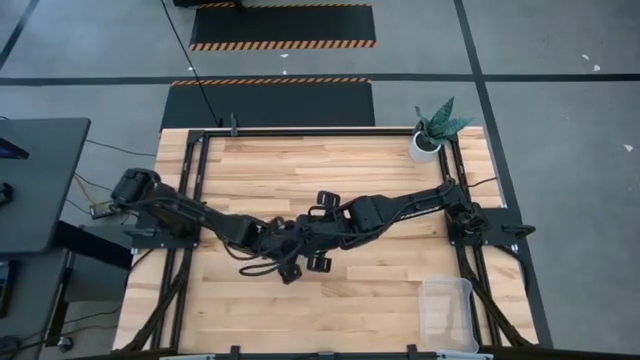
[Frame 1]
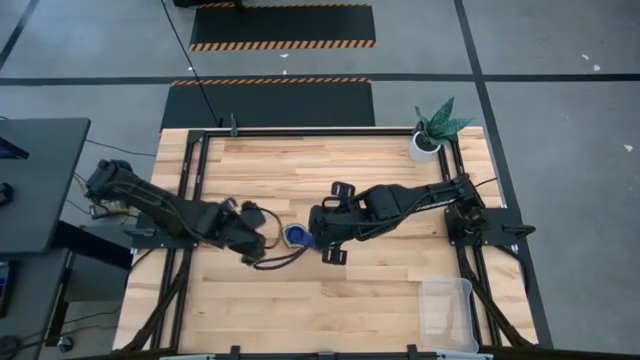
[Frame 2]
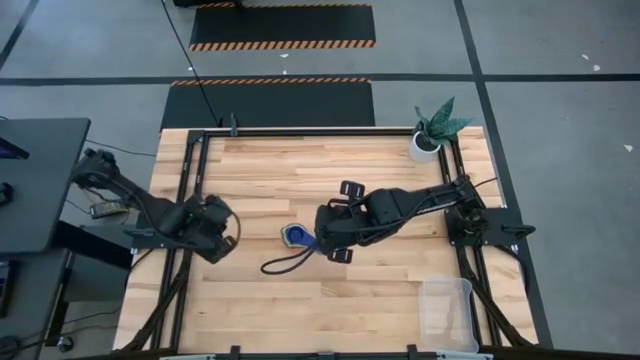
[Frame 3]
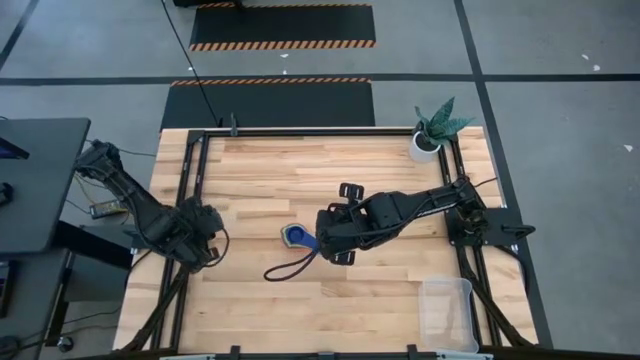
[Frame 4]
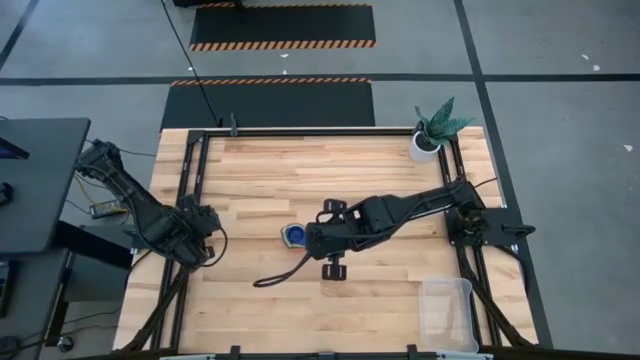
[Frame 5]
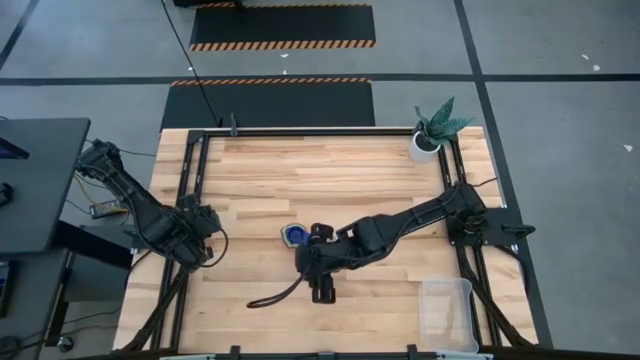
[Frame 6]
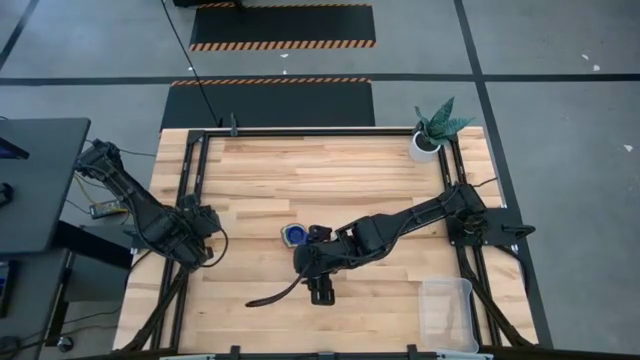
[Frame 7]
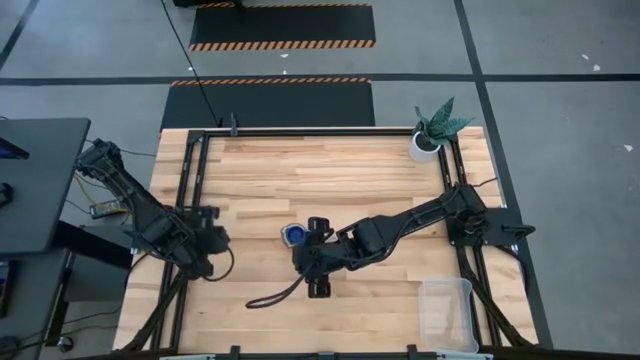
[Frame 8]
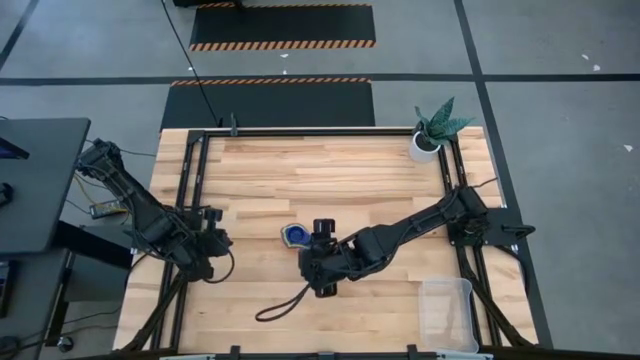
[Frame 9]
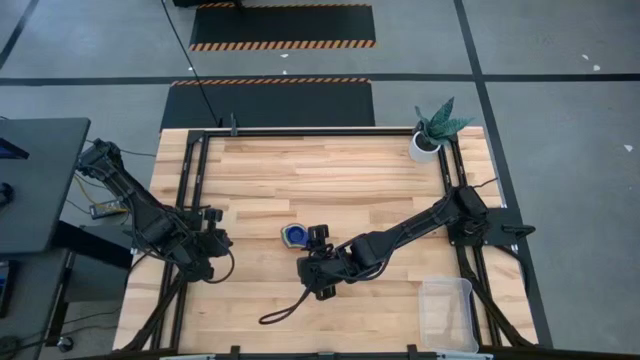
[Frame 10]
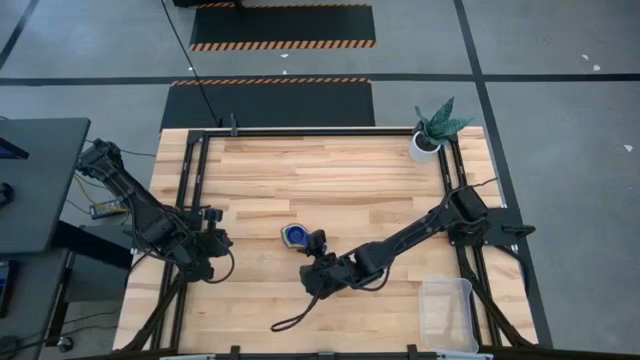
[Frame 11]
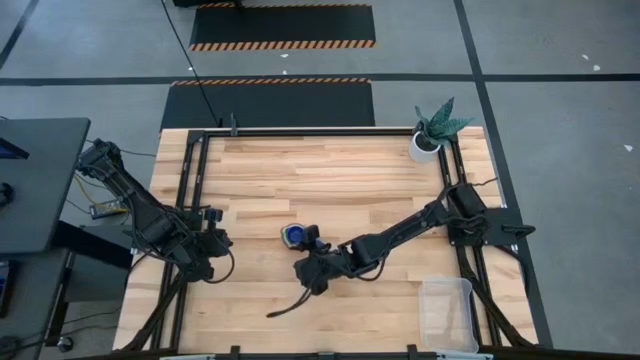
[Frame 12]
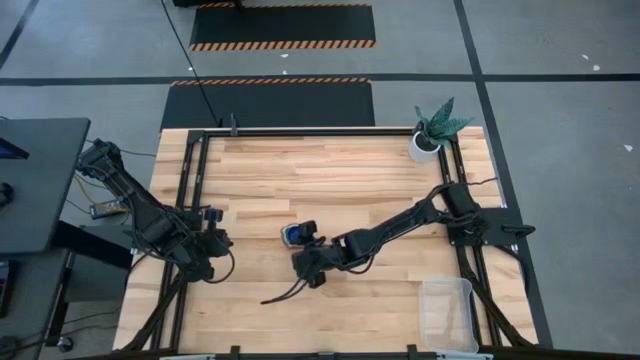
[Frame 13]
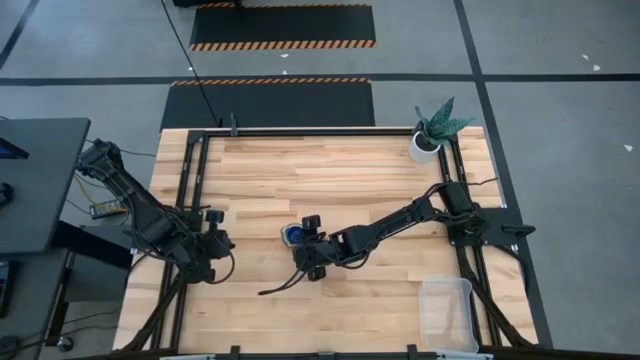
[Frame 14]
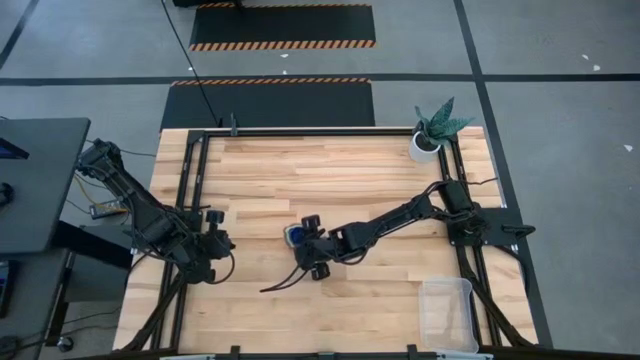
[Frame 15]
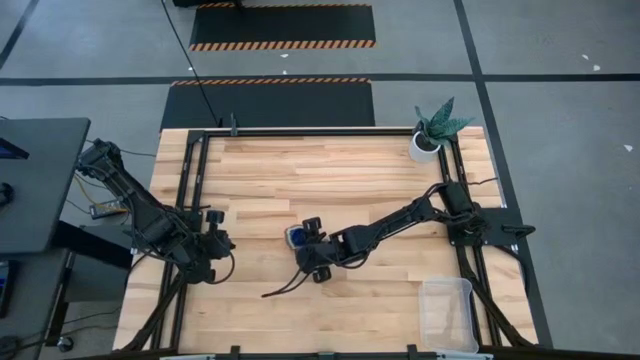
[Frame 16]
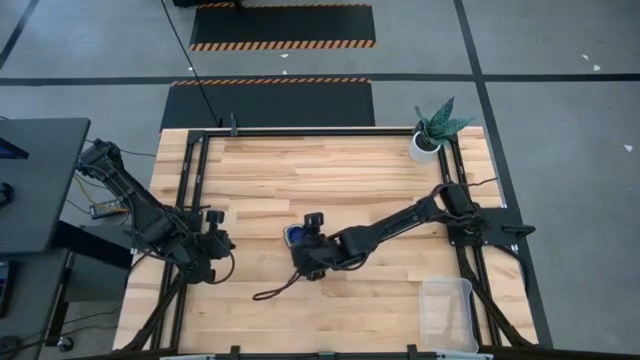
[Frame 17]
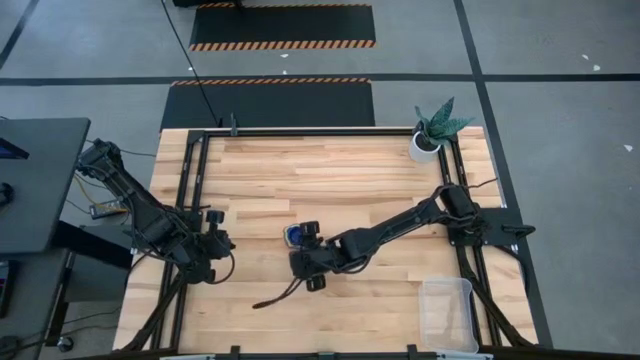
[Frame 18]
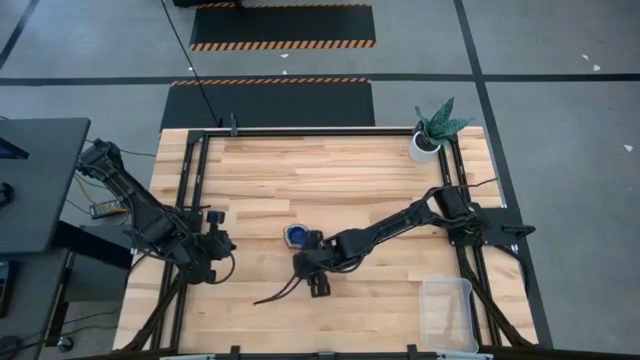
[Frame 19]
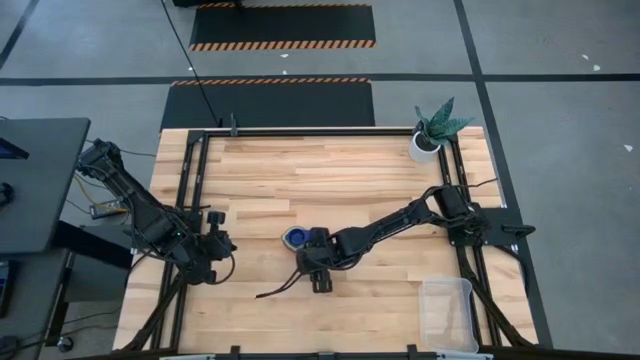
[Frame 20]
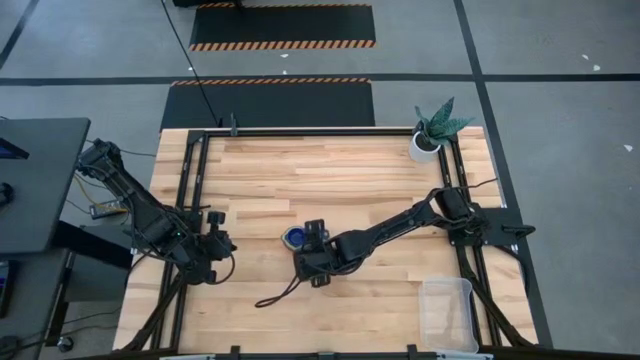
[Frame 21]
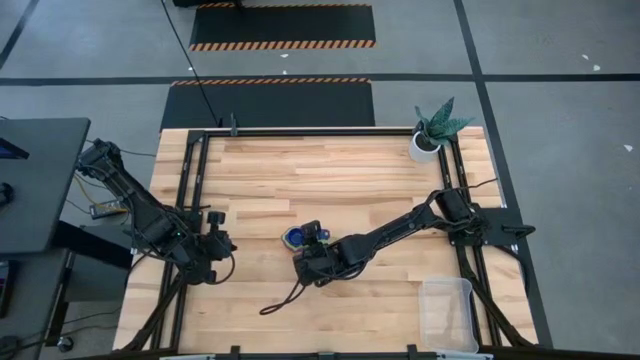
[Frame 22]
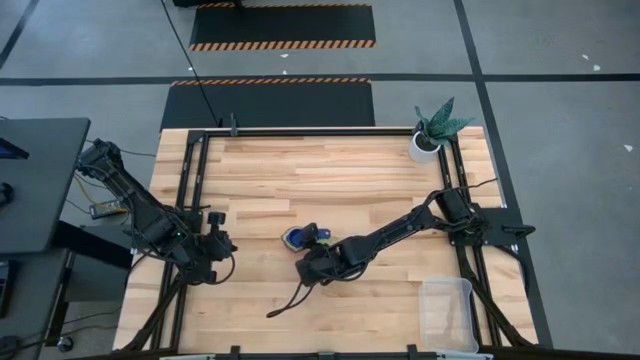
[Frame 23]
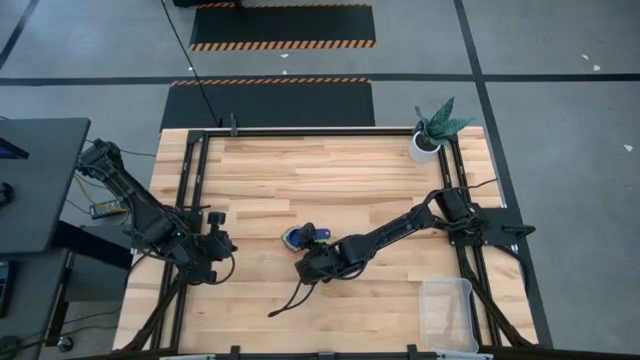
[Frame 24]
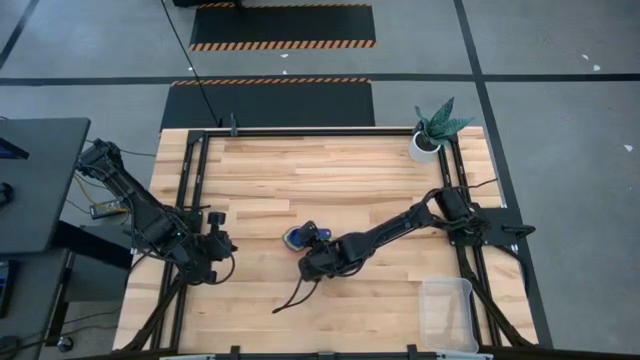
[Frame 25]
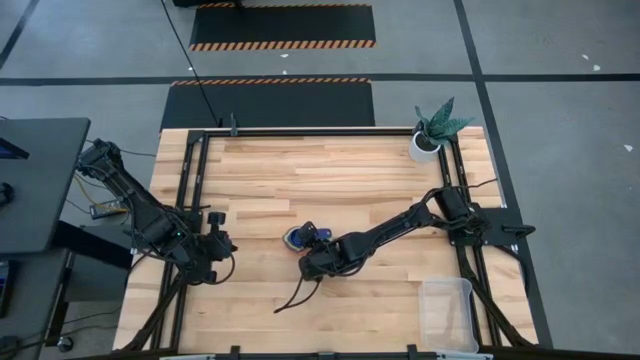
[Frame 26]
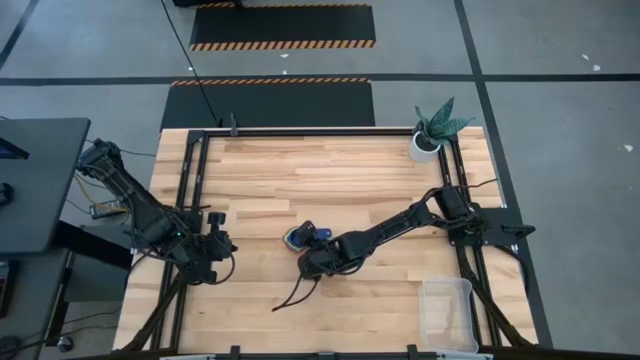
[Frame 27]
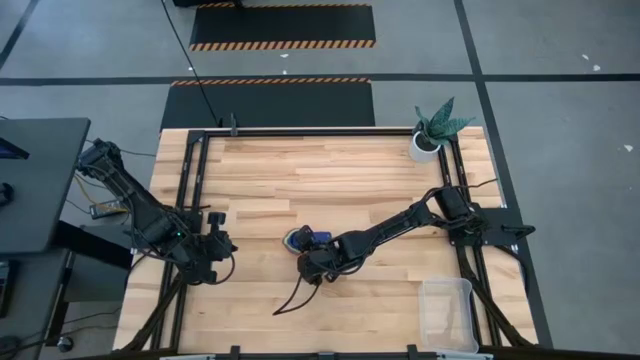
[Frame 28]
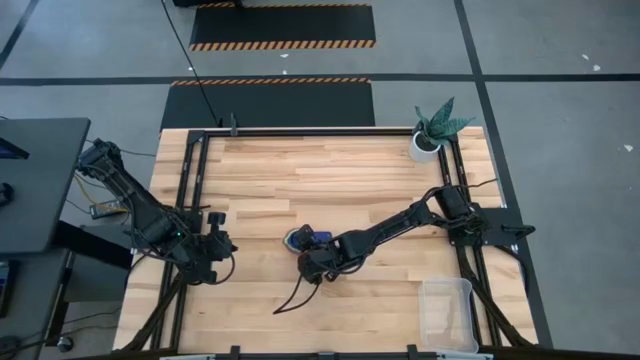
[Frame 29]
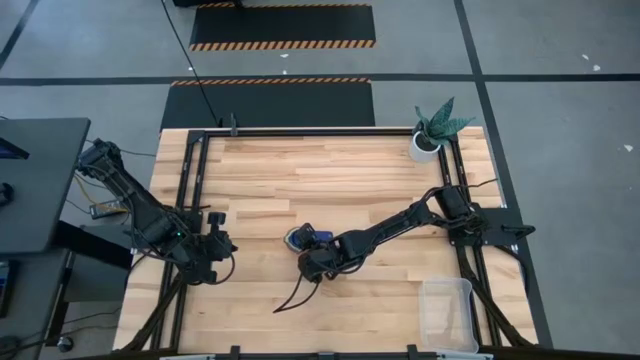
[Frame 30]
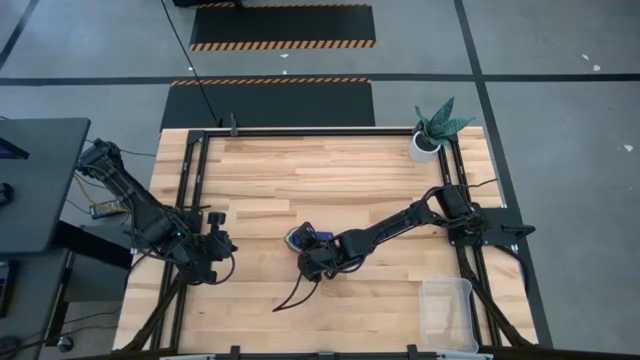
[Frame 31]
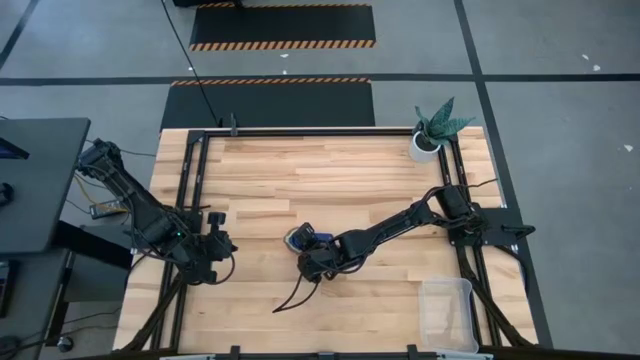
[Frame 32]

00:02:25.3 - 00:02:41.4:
Task: Nest measuring cups in basket
Put the nested measuring cups into the transparent bin

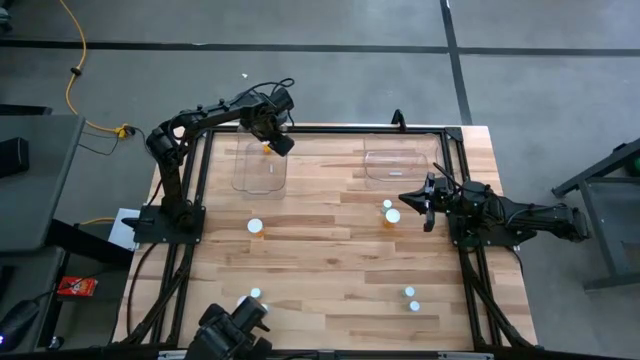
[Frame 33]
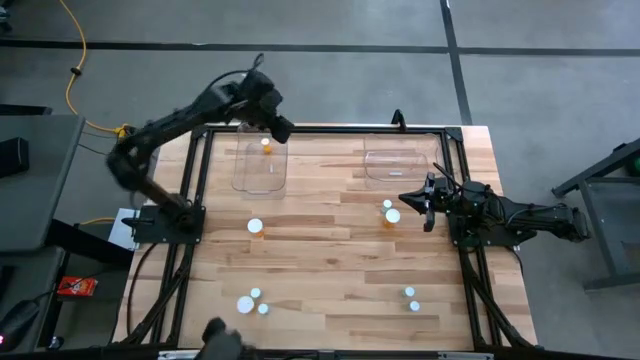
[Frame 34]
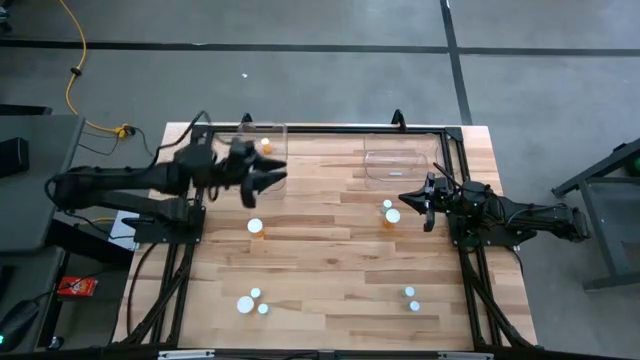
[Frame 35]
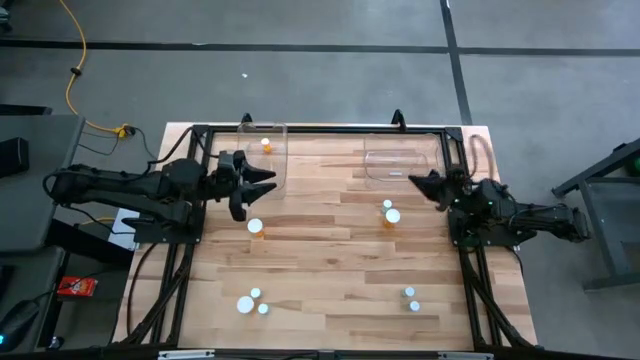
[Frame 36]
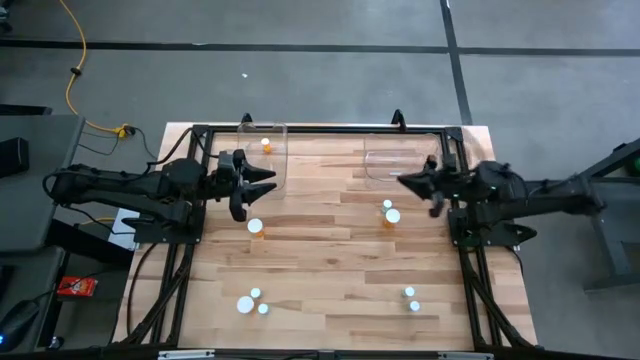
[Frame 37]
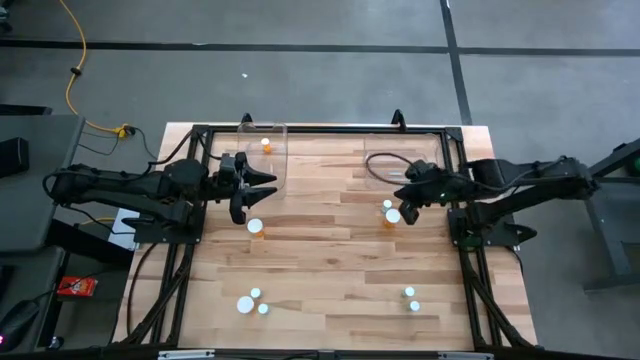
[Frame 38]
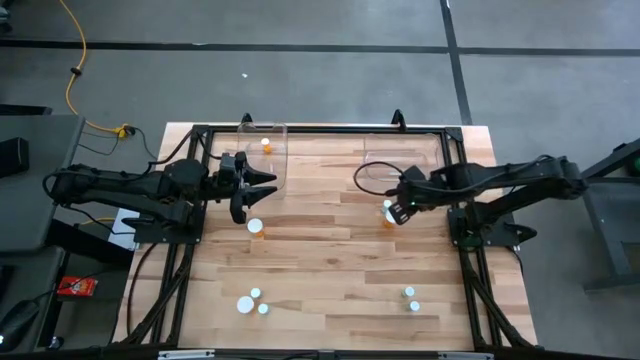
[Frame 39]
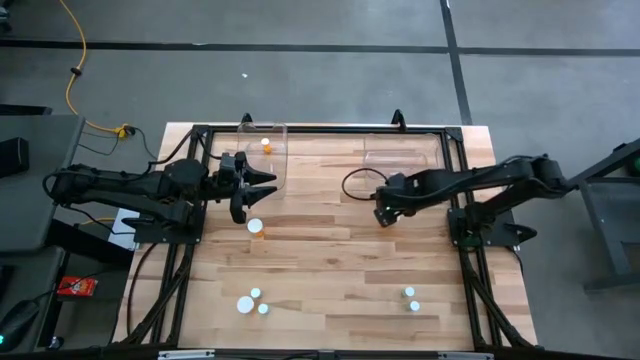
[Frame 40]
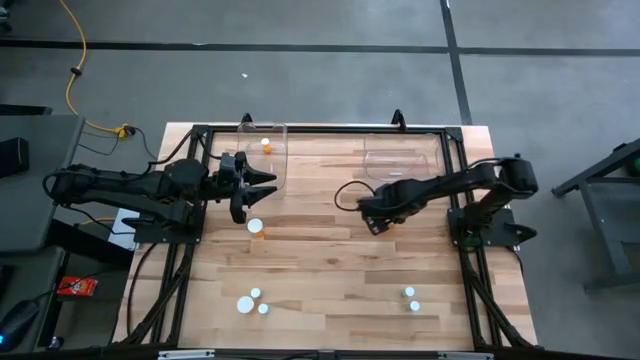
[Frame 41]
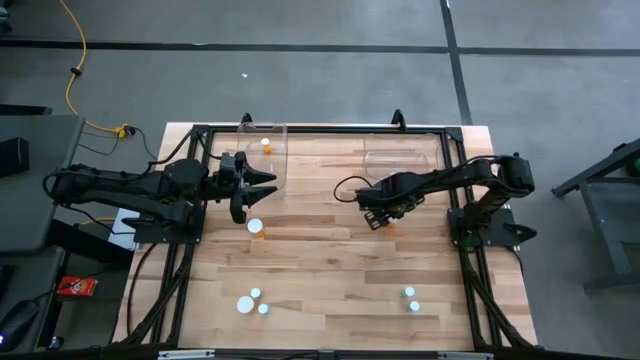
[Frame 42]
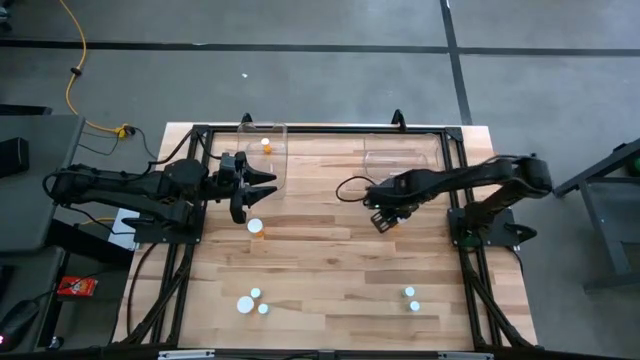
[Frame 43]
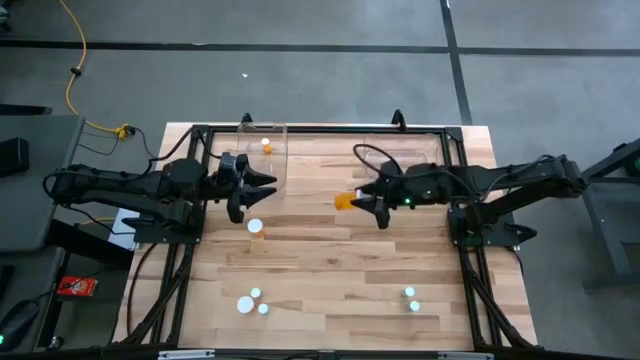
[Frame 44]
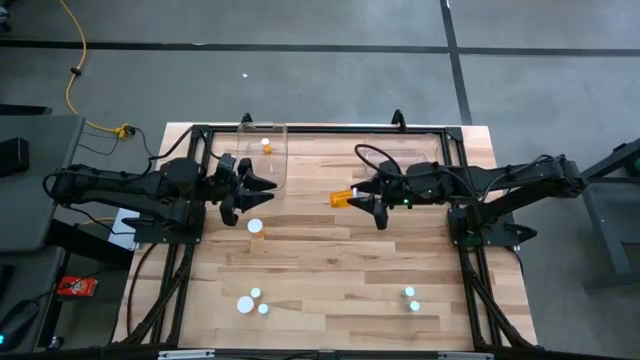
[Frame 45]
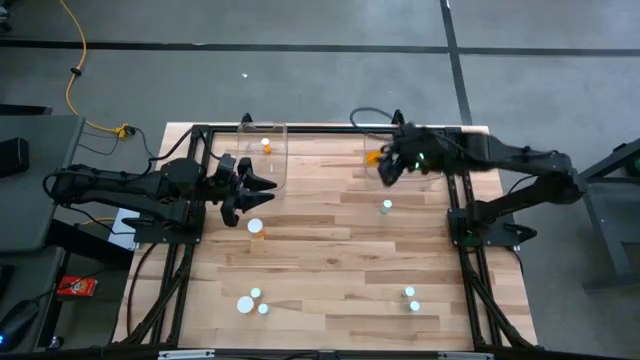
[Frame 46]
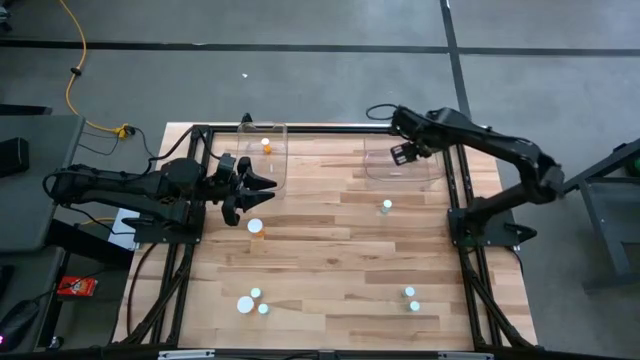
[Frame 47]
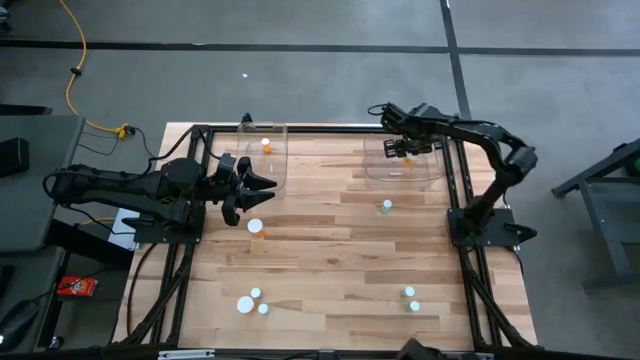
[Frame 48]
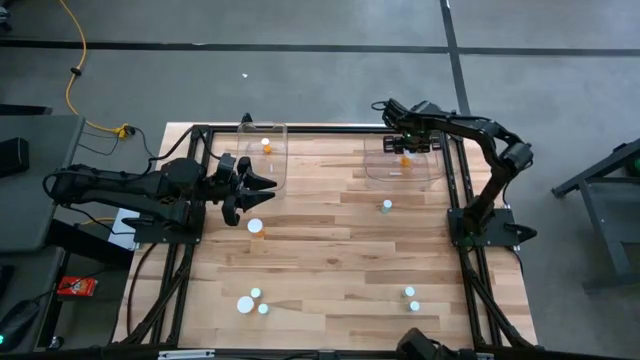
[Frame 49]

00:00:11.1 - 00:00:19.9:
Task: Pick and place medicine bottles into bin by pill shape (circle, oval)
Put the large orange pill bottle into the right transparent bin
